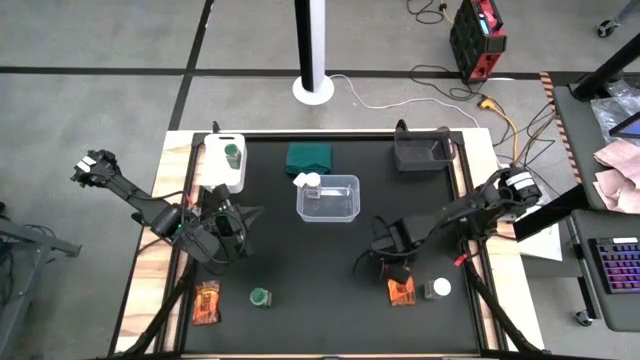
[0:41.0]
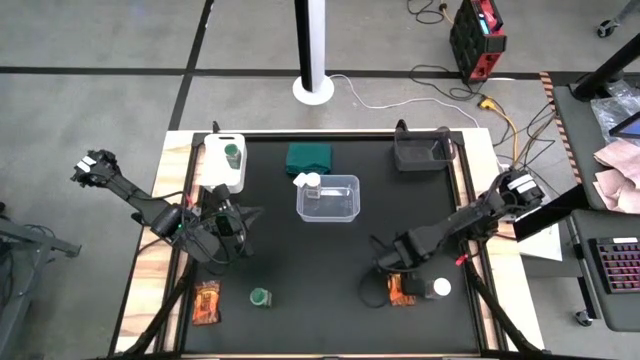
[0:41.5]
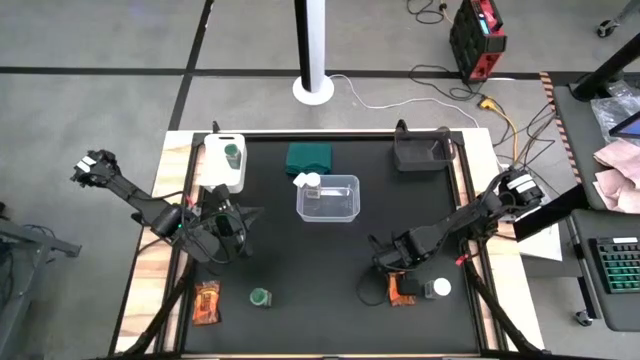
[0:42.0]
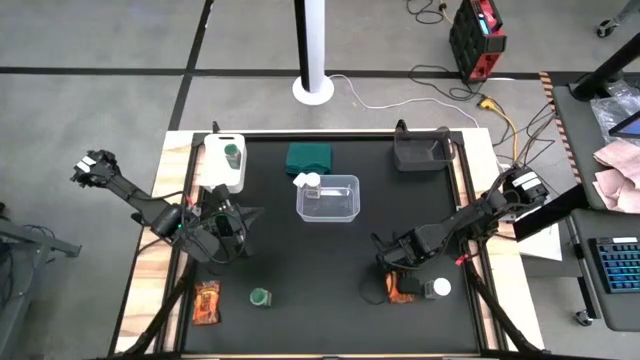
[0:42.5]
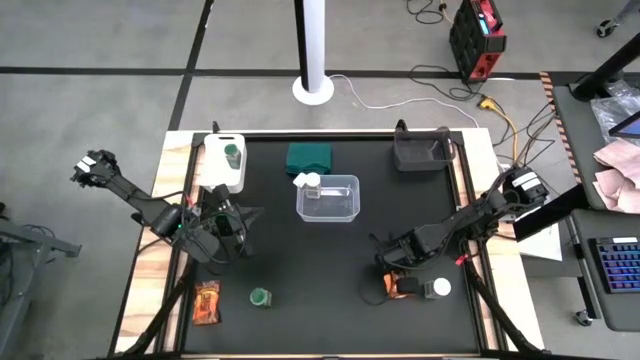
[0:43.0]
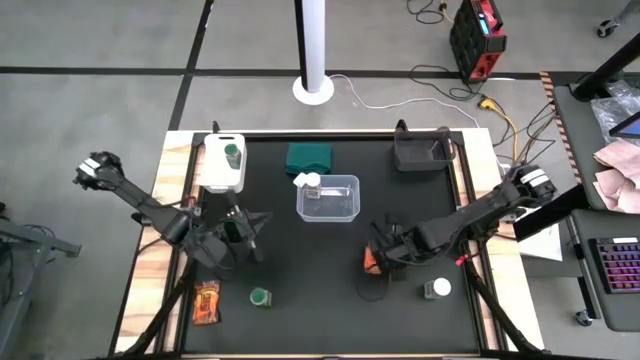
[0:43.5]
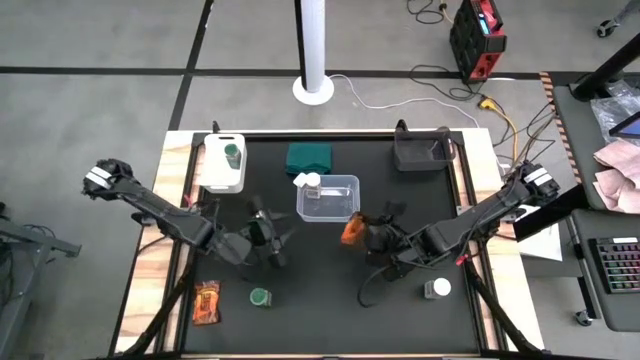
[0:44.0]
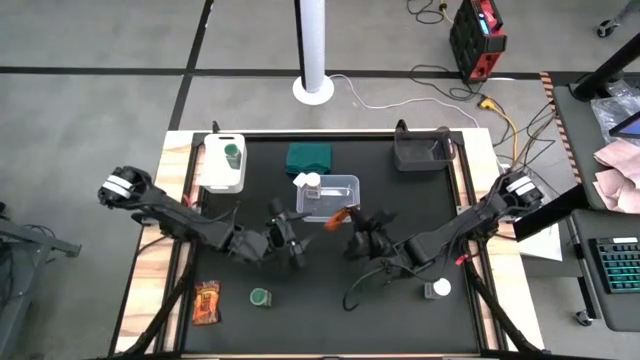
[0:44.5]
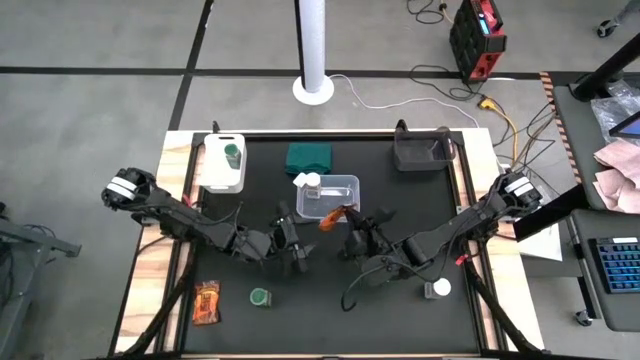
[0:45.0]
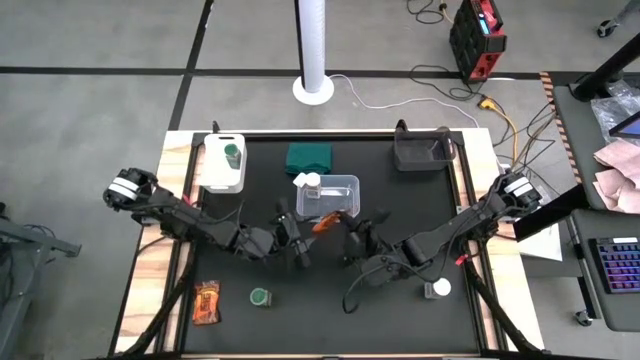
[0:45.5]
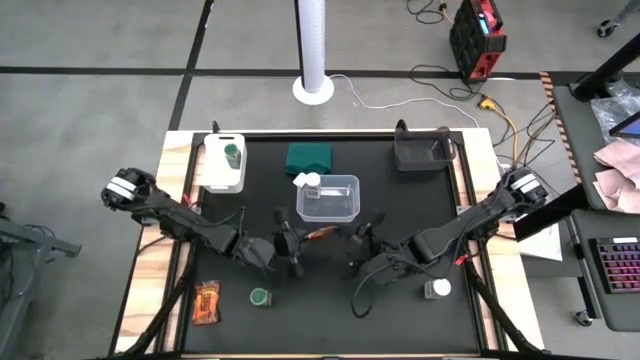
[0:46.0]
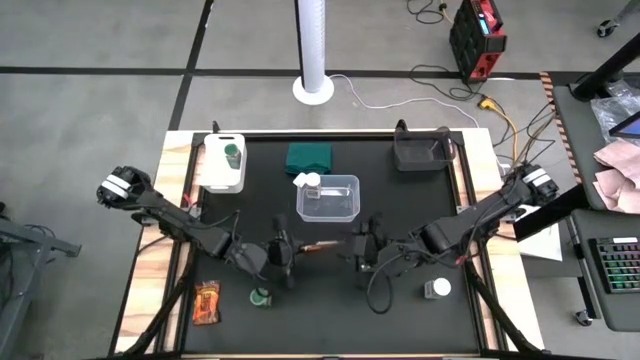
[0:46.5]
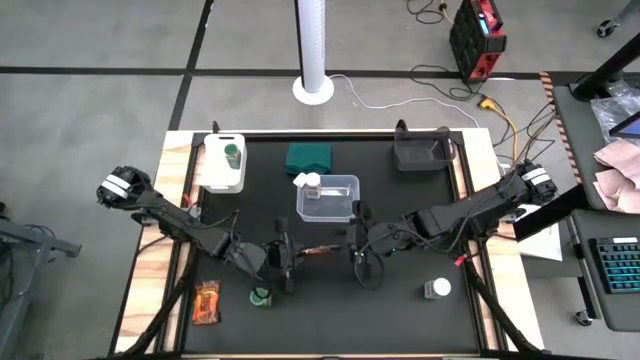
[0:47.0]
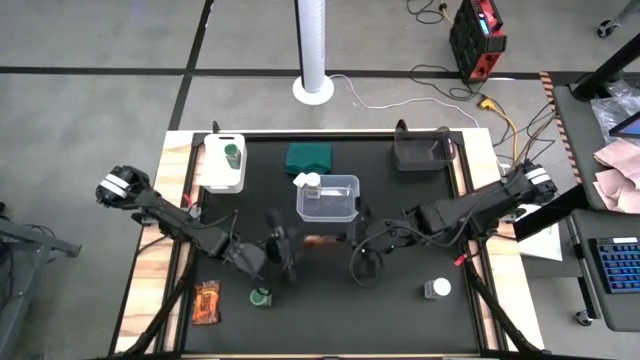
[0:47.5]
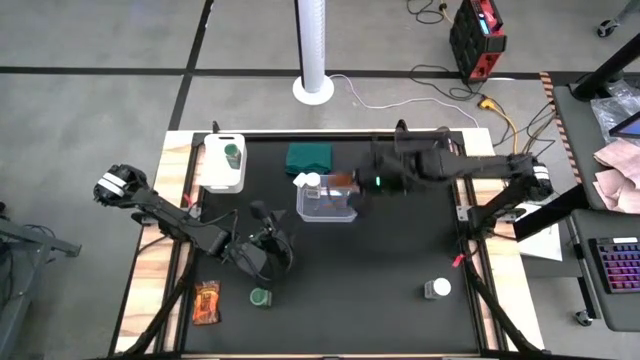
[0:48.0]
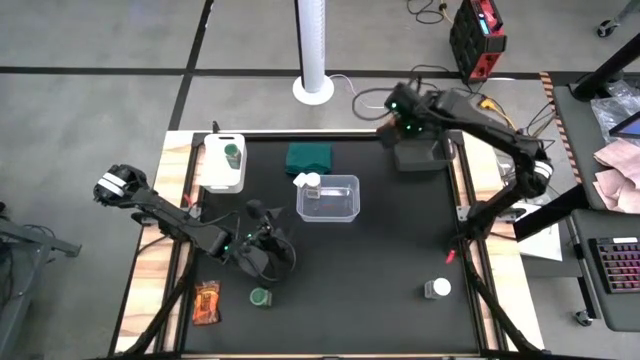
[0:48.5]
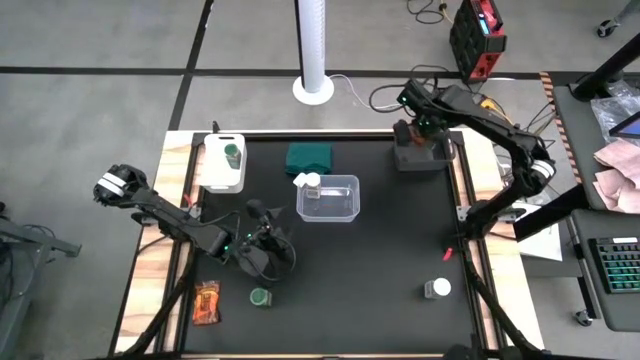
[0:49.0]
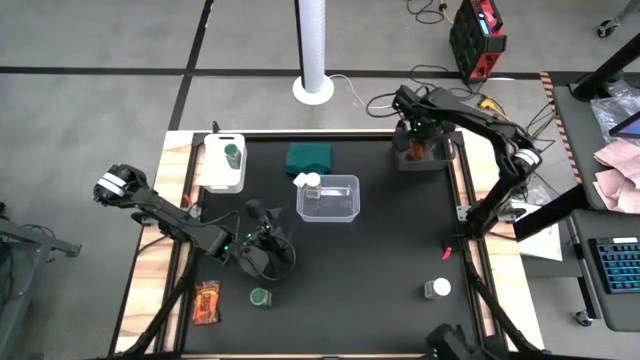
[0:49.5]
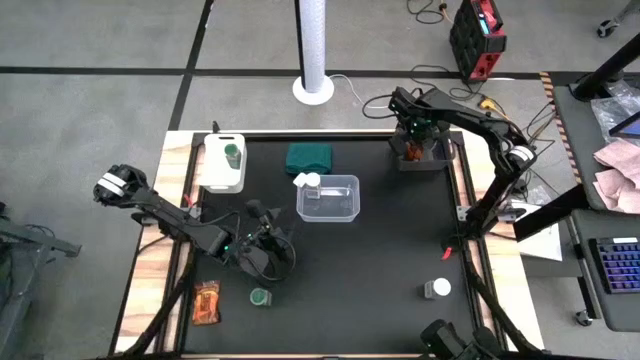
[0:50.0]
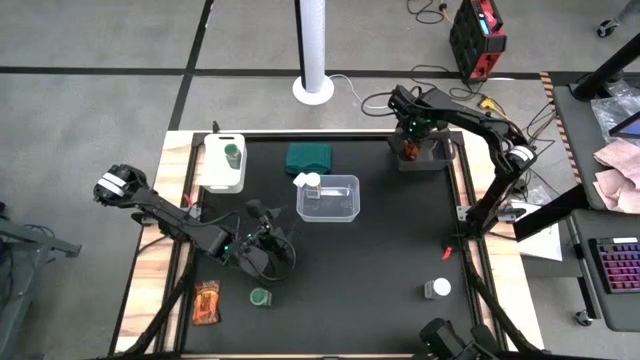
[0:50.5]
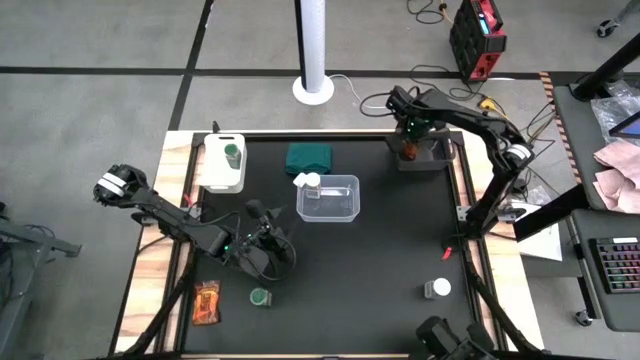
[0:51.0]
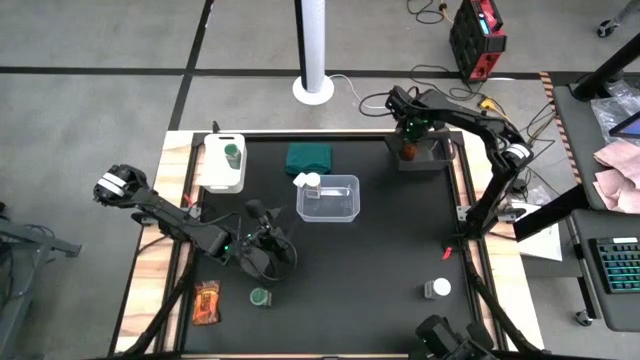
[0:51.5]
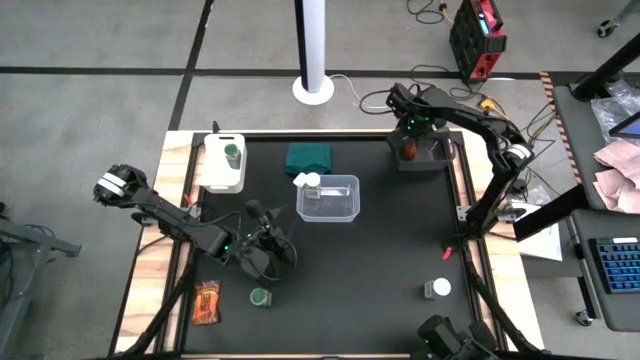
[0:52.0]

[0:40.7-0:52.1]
Task: Sort spices by type
Put the bottom right spice pack into the black bin

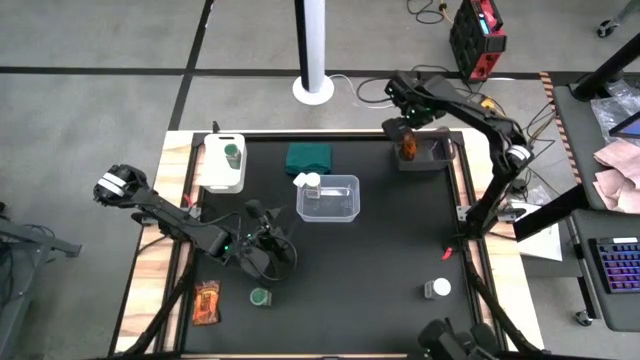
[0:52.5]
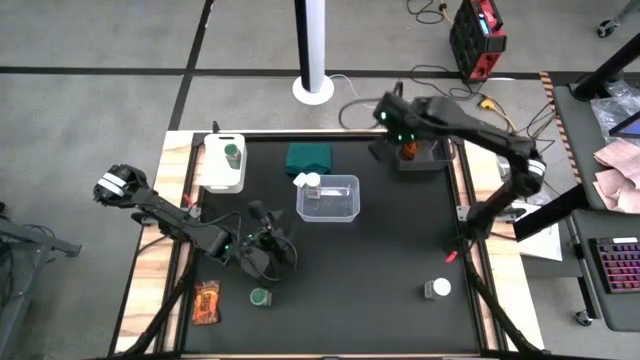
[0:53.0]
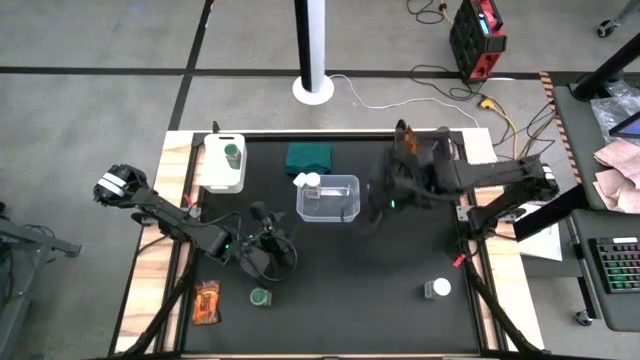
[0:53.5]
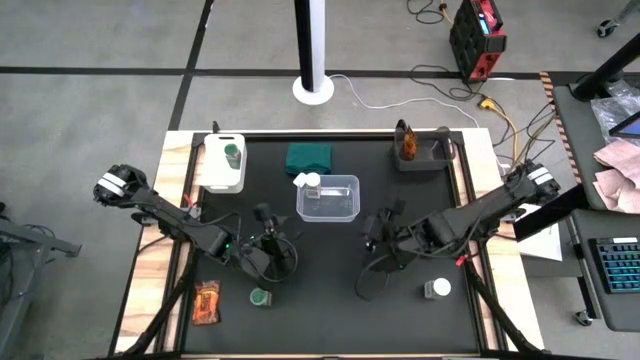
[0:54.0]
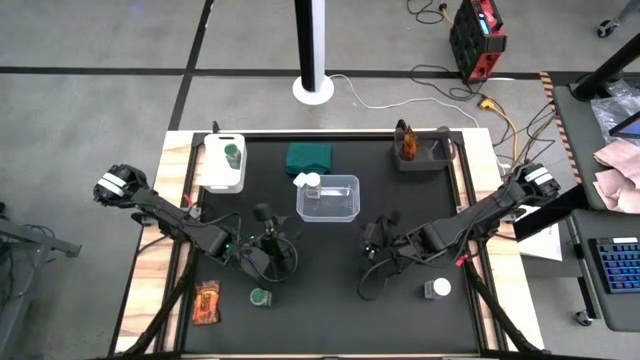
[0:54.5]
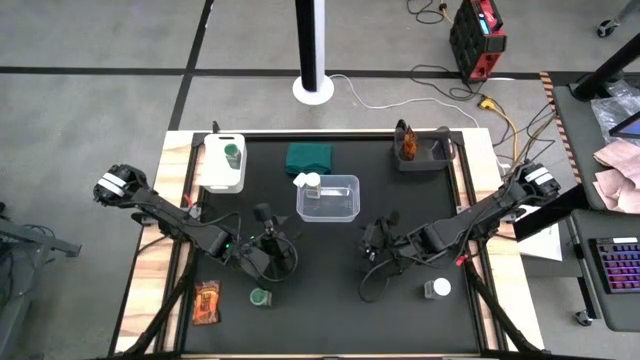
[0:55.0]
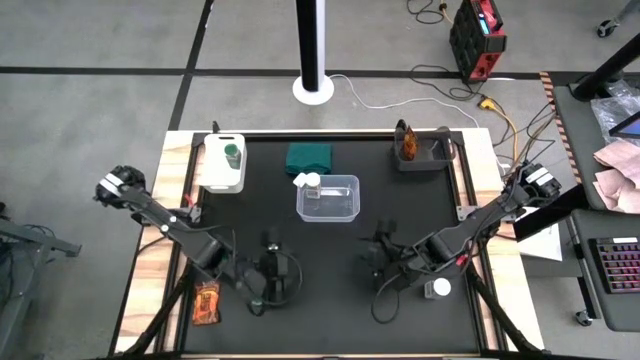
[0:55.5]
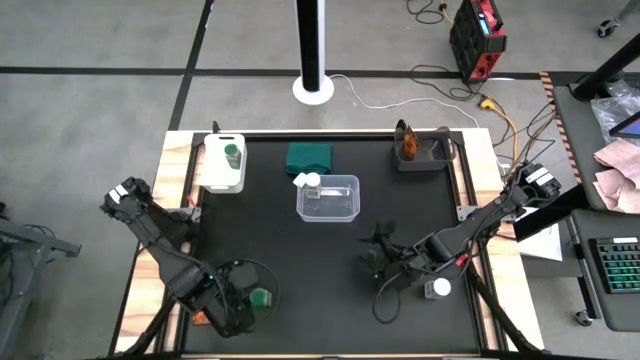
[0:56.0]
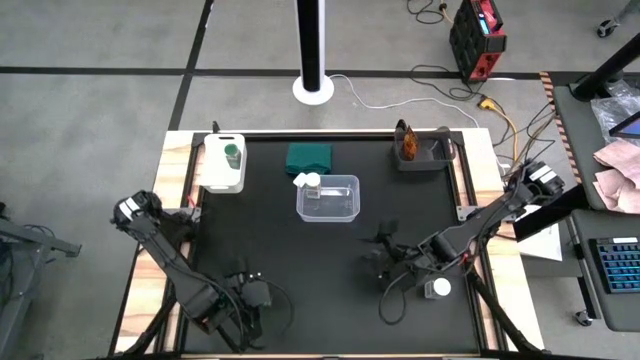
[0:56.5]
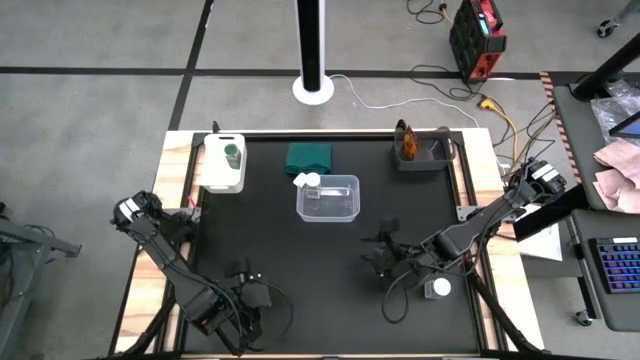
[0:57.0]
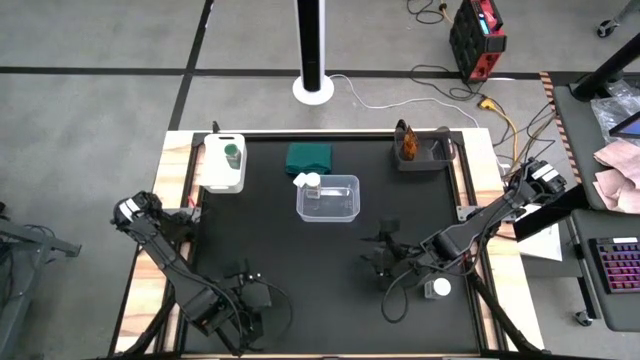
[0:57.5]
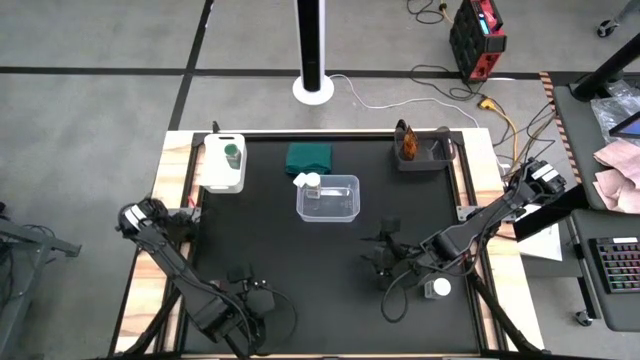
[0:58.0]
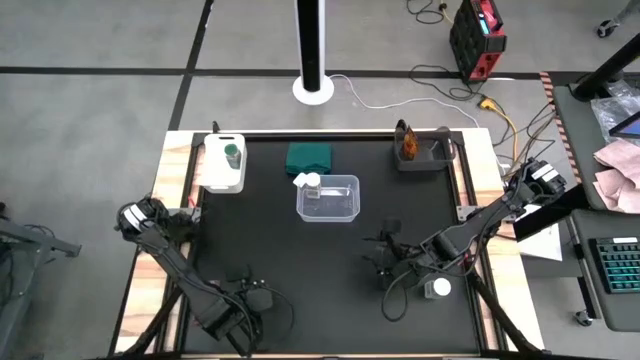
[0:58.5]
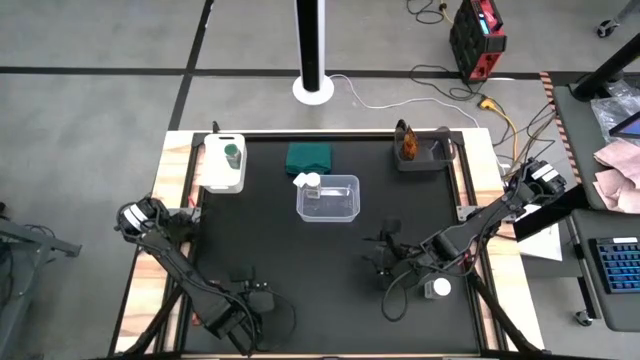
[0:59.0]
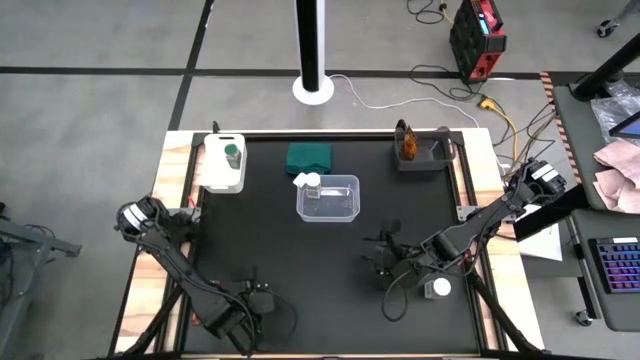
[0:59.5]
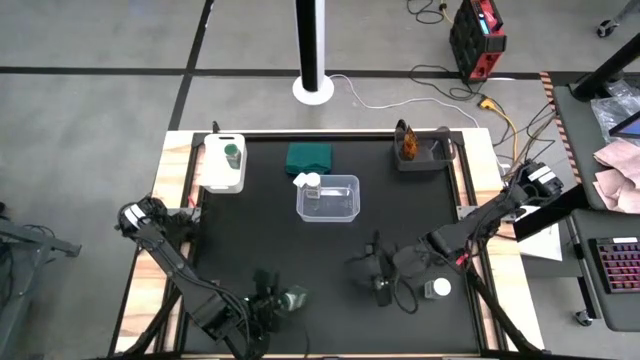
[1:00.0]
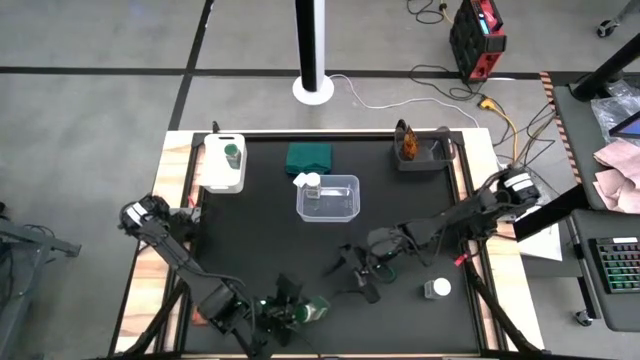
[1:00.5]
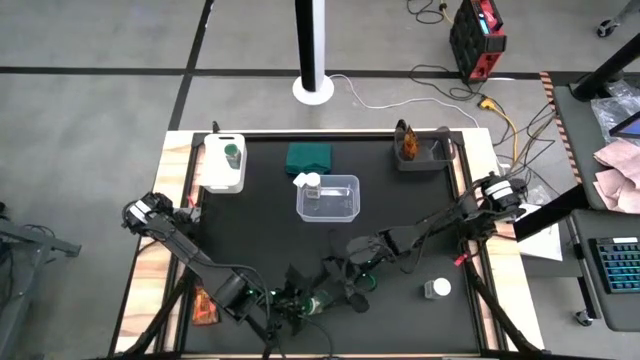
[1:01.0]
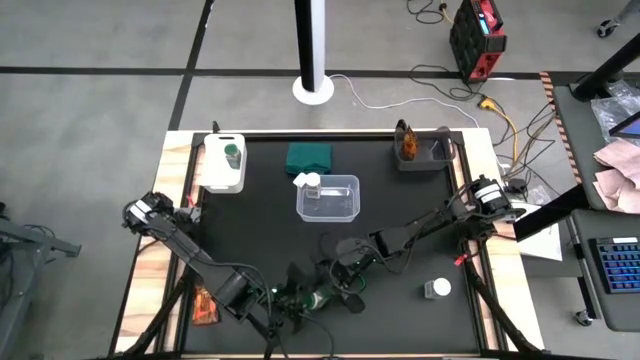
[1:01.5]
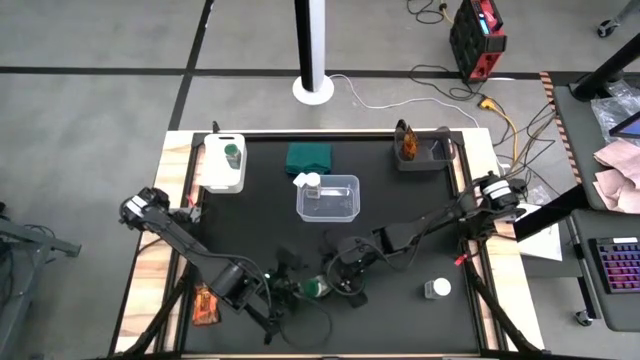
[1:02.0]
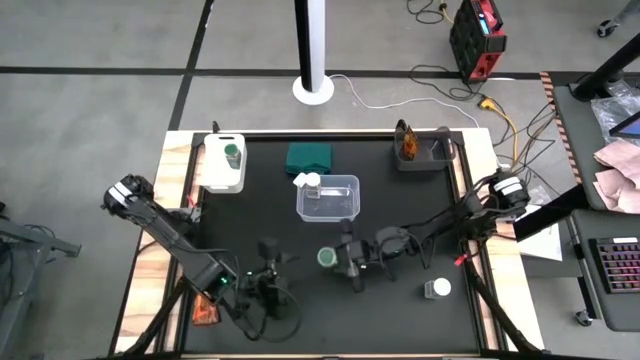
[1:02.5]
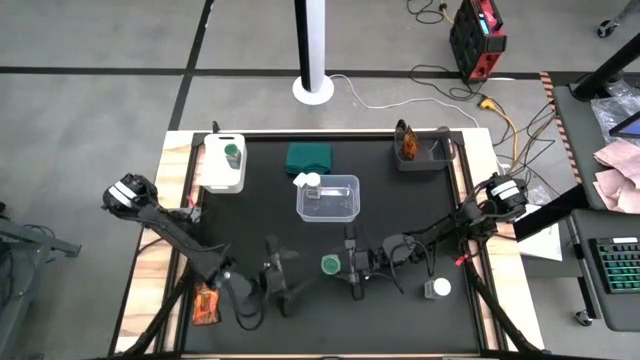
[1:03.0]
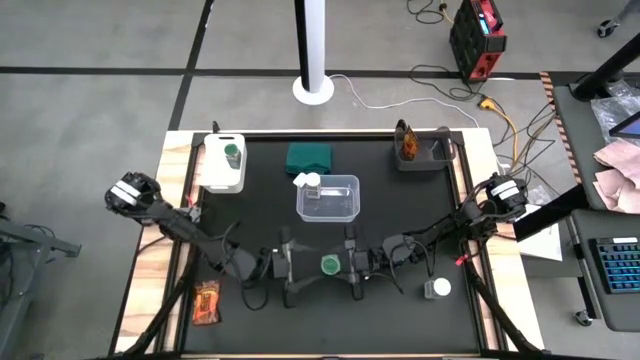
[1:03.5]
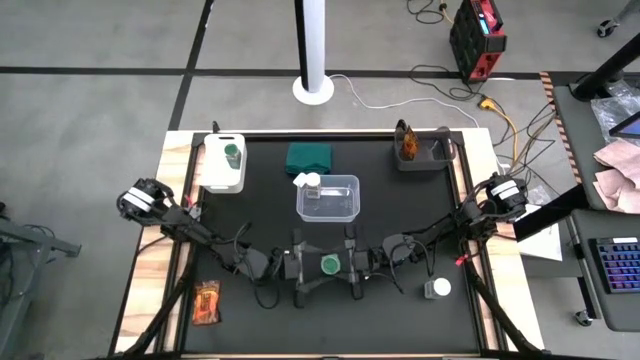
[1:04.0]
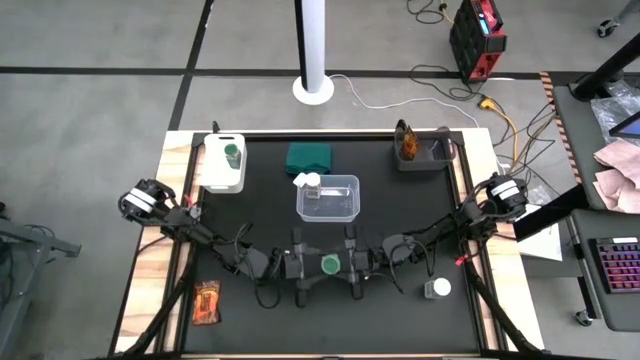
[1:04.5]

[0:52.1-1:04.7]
Put the green spice bottle into the white bin
